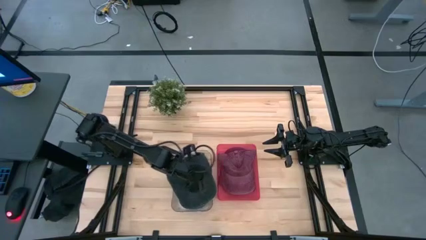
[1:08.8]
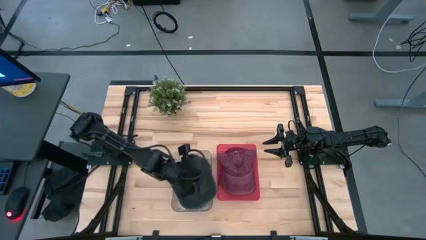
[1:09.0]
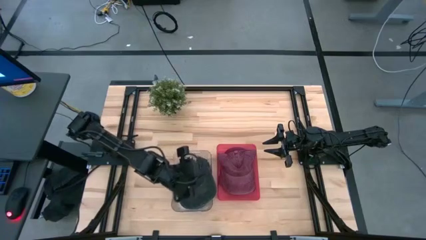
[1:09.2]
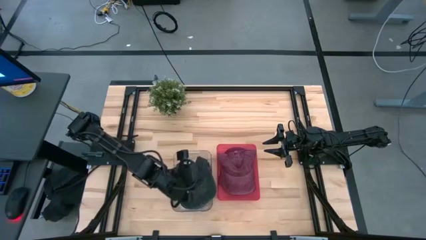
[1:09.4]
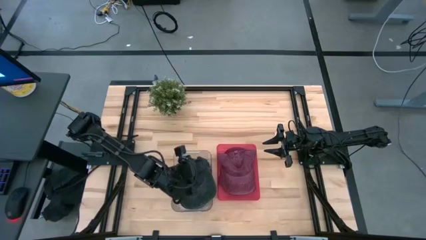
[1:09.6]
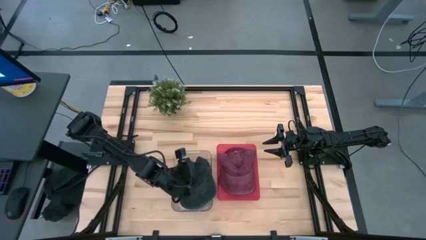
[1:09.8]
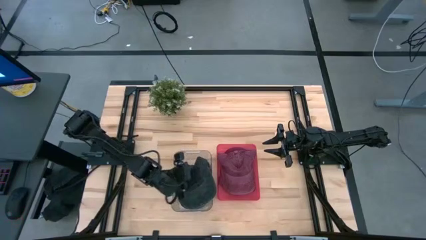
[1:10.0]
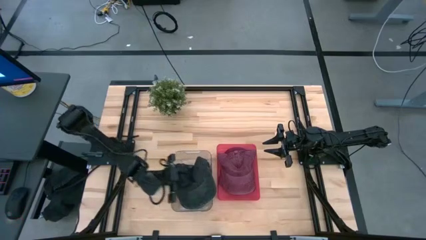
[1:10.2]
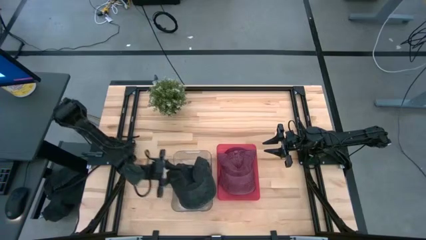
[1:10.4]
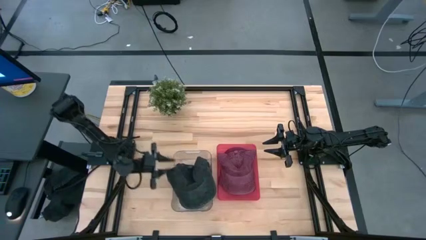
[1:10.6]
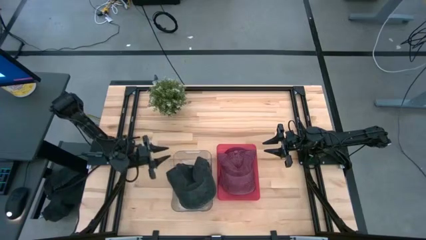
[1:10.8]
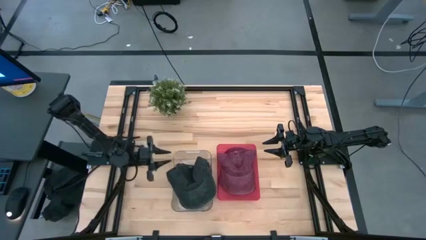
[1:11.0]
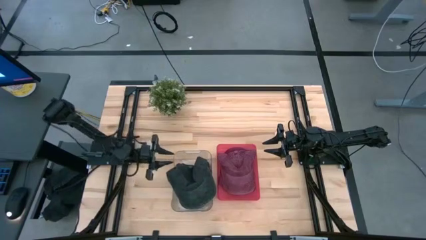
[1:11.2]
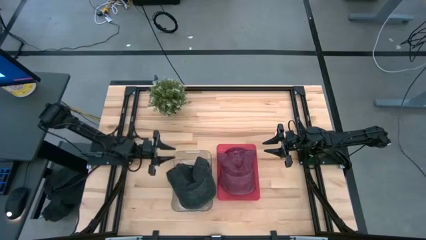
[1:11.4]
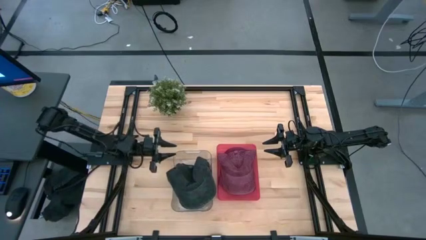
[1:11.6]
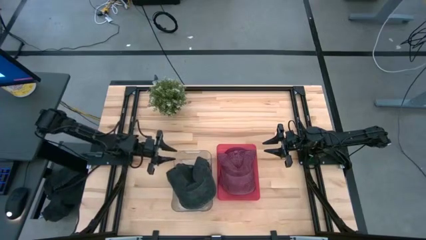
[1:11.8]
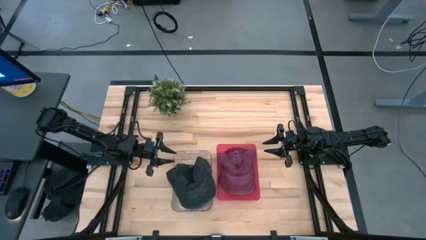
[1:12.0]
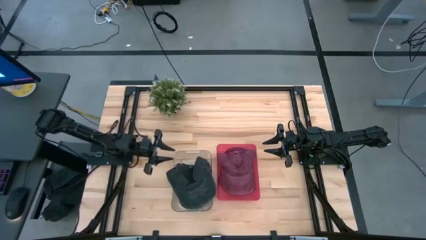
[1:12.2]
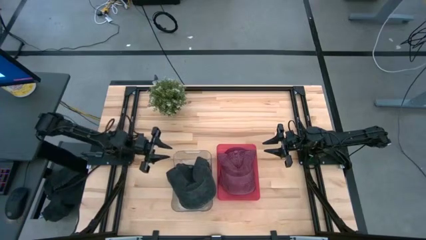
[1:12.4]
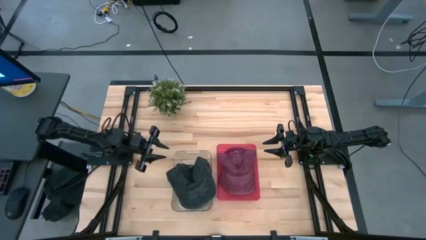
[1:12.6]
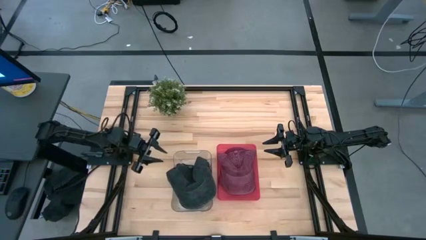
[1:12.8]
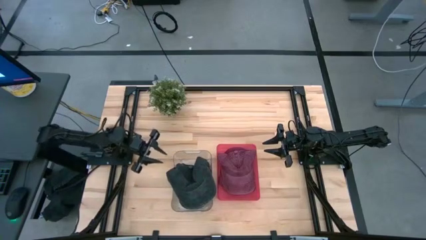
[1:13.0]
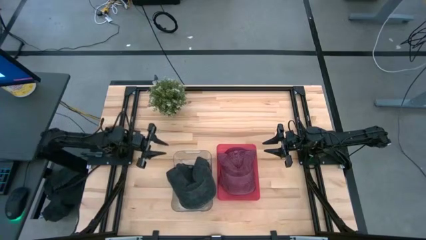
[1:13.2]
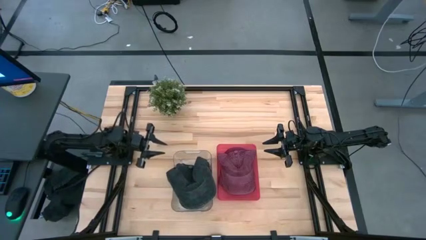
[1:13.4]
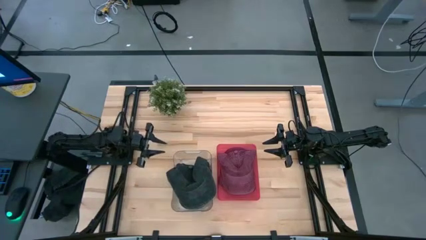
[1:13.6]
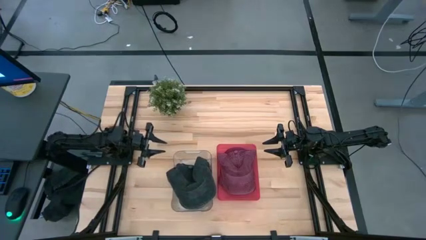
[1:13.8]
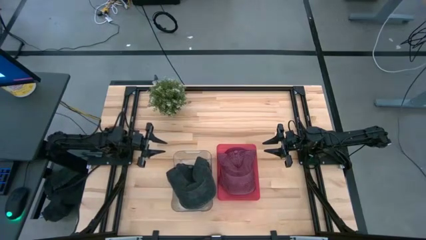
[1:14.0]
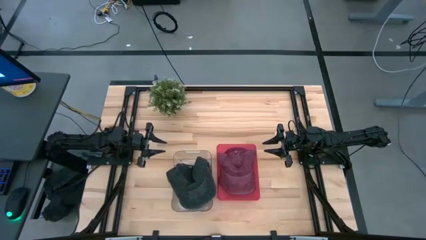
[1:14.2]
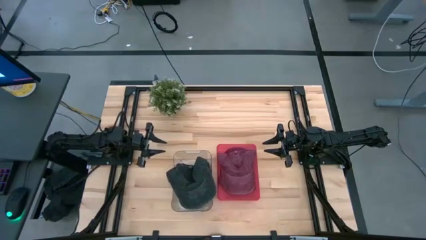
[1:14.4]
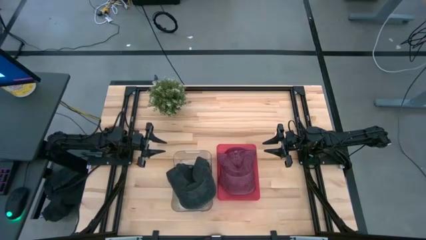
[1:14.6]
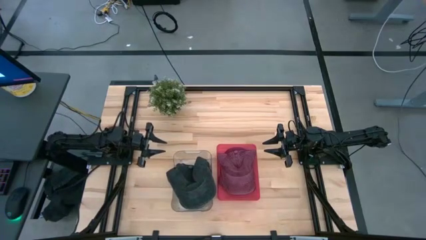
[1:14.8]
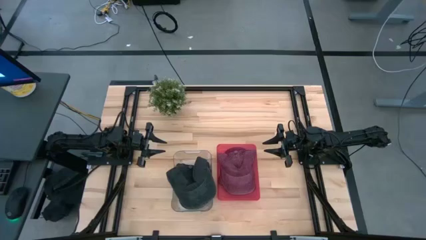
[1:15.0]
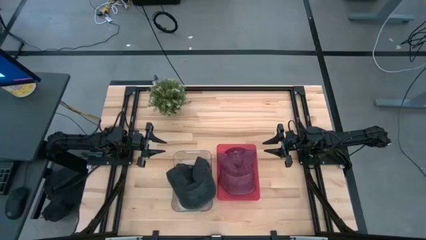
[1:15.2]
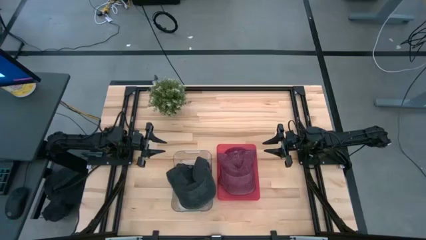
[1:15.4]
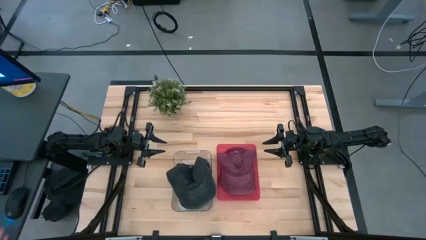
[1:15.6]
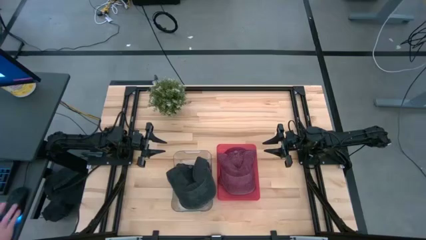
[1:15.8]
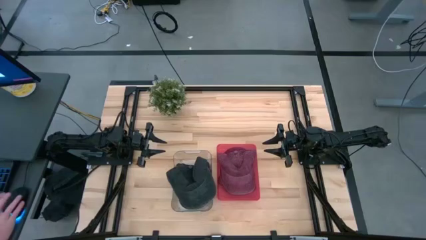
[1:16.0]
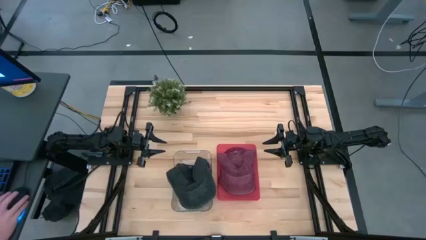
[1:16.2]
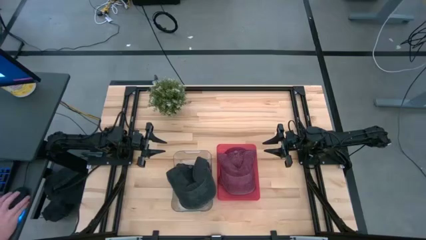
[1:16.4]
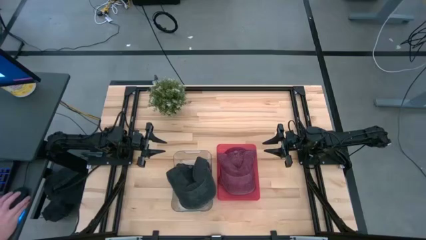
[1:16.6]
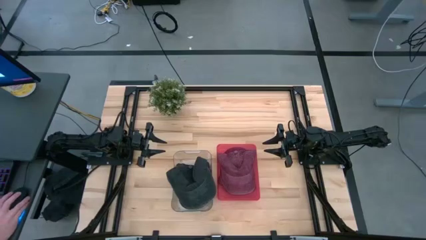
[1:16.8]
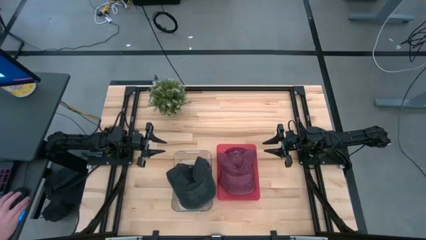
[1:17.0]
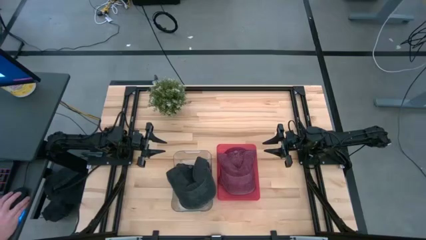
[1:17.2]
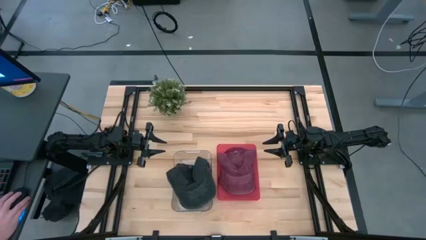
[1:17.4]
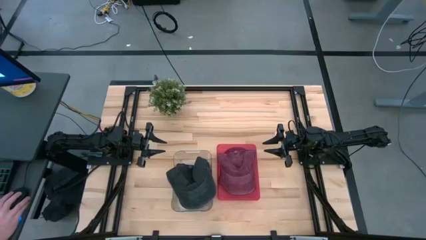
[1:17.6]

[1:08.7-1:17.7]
Task: Pick & Place hat
Return to Home Position
